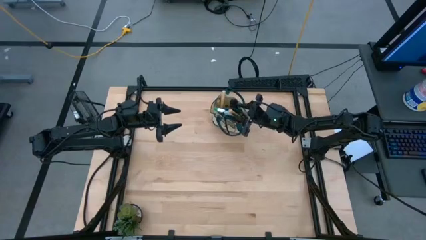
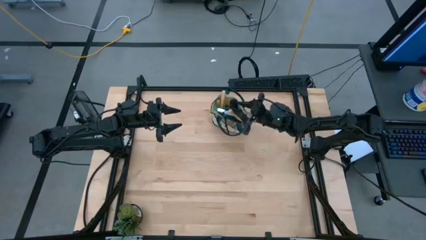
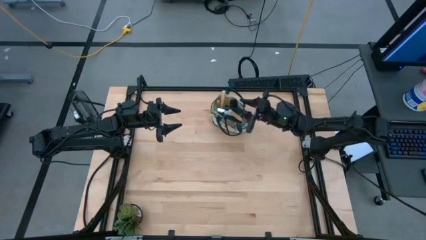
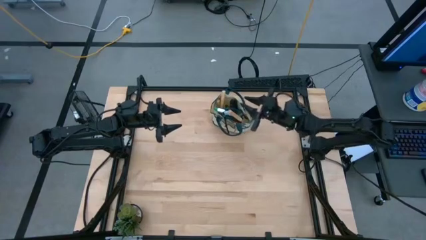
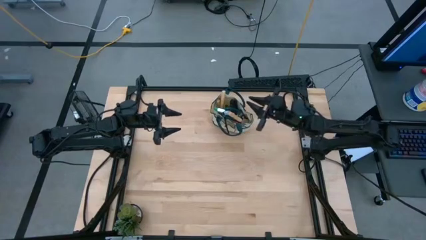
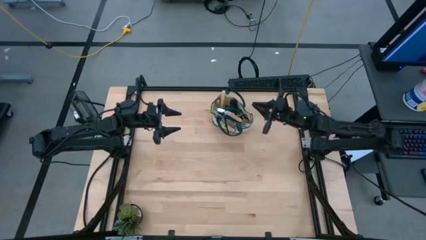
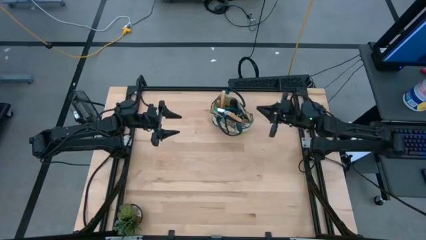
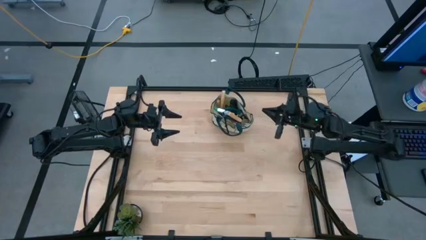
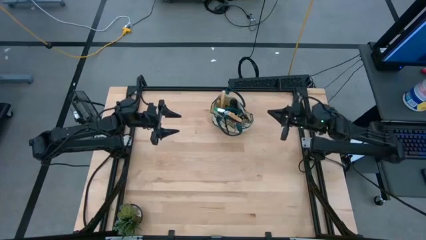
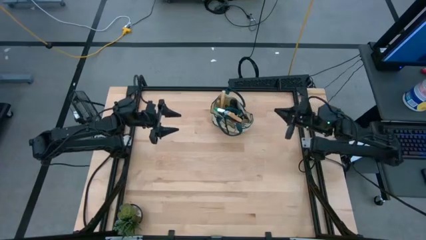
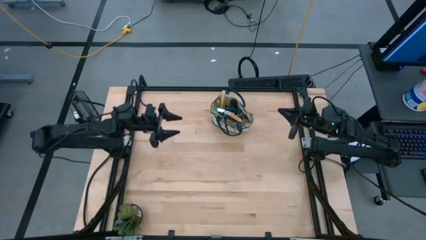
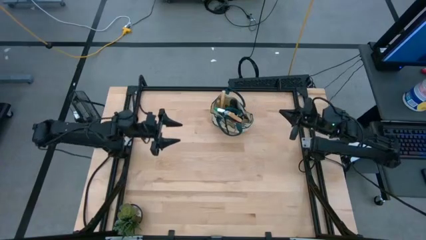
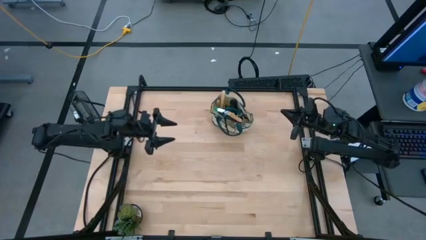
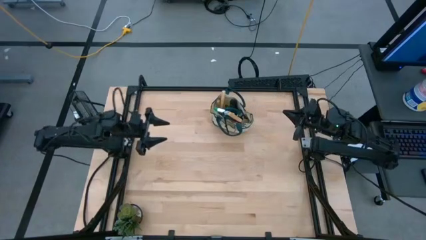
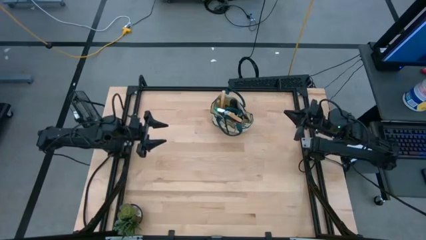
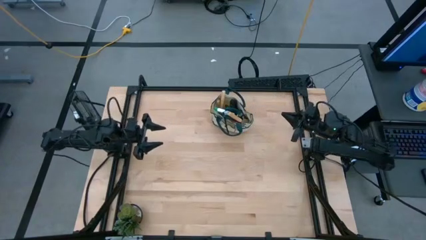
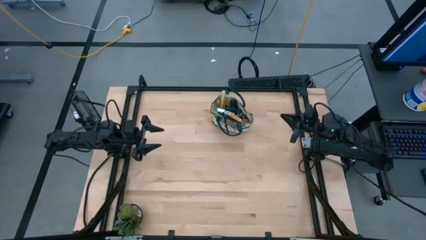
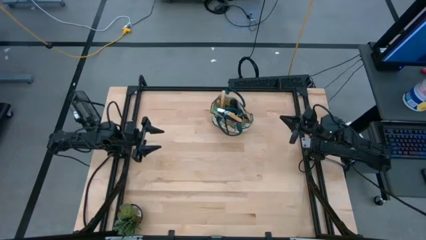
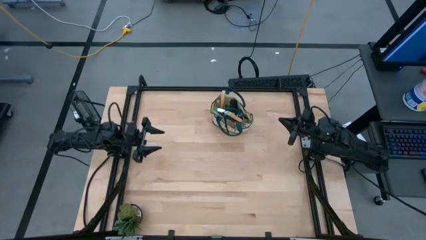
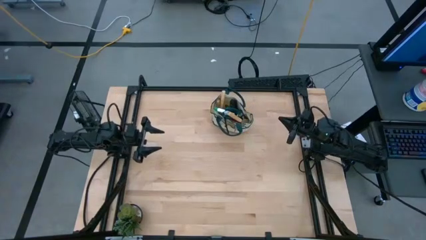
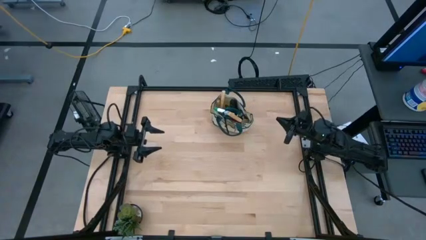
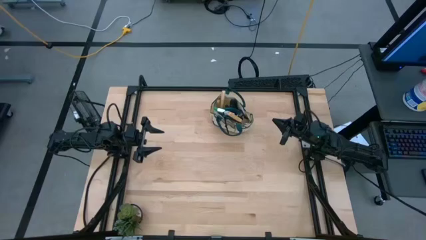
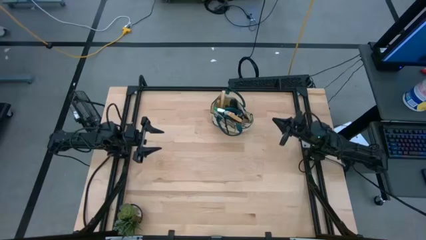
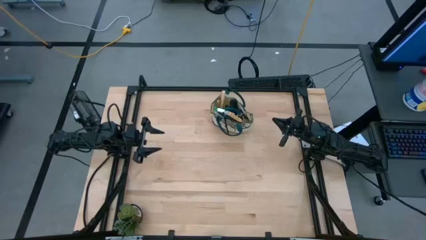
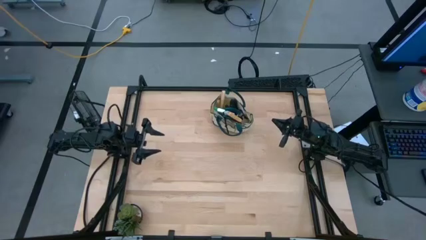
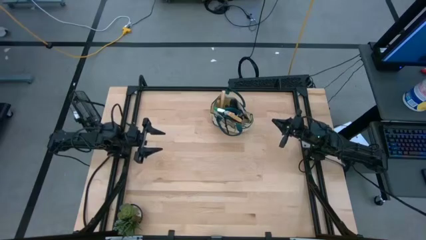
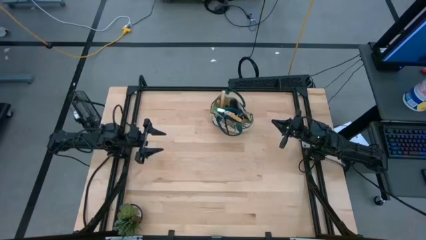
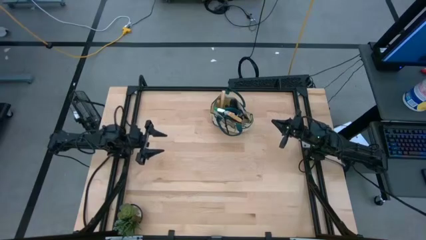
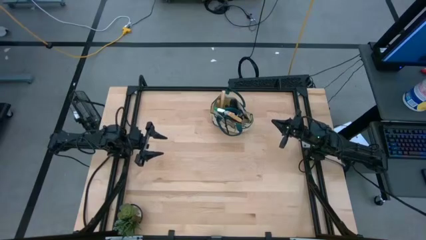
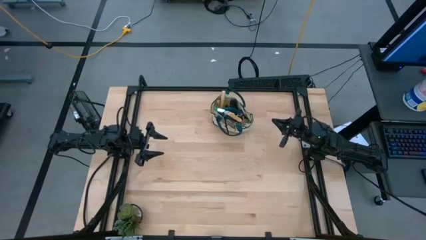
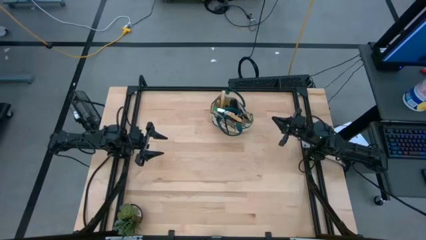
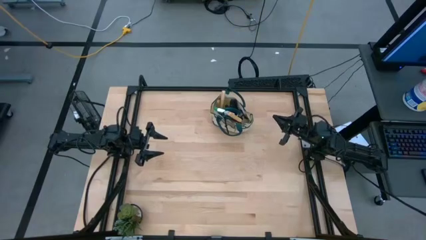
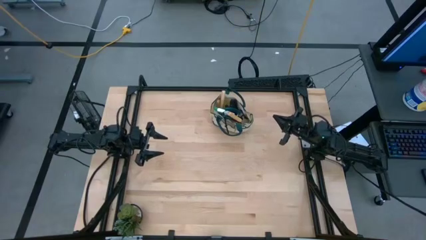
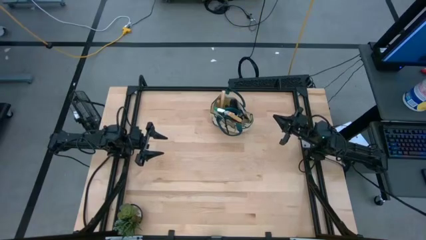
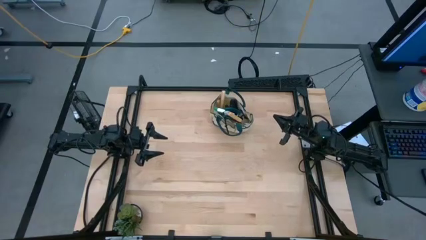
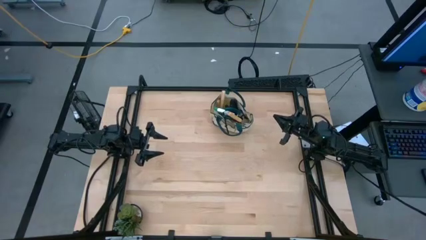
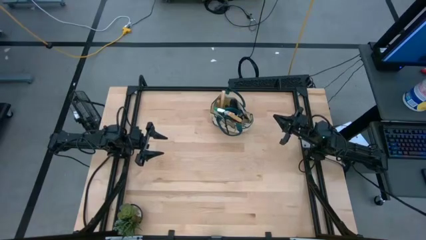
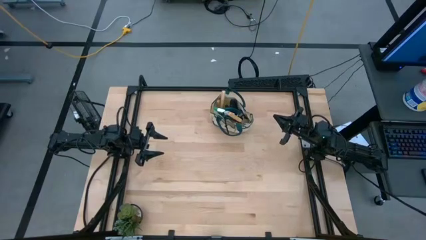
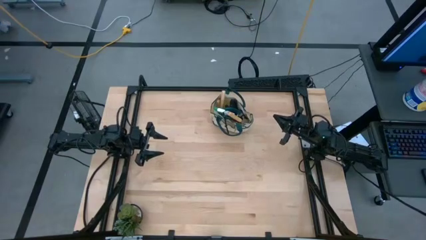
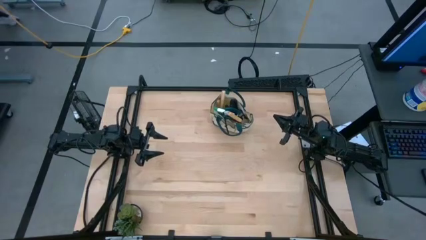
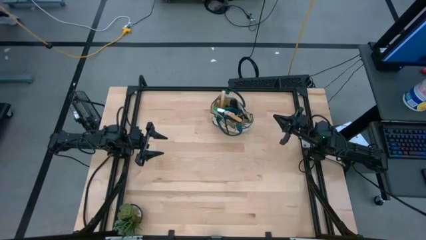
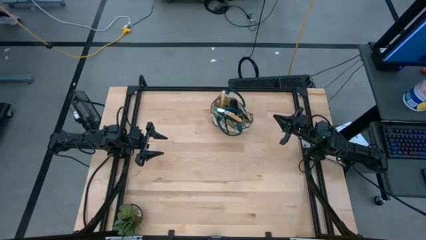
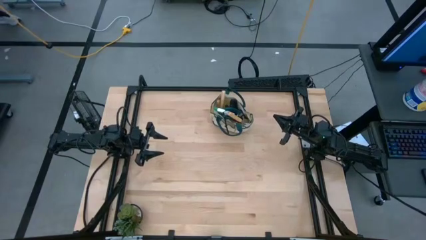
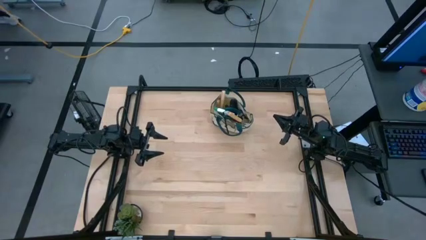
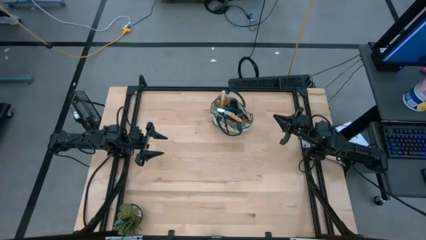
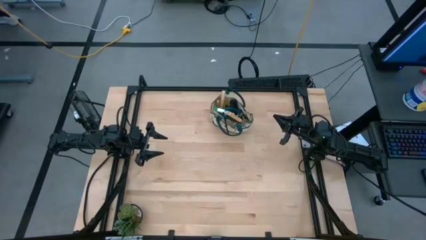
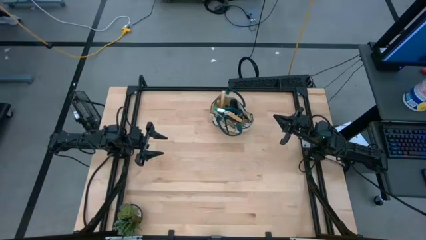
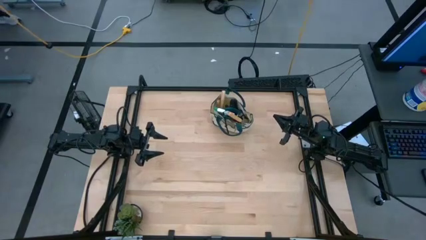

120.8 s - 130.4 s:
Task: Pick & Place Garden tools in Gardening bag
Return to Home Position

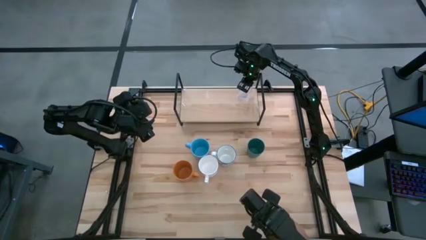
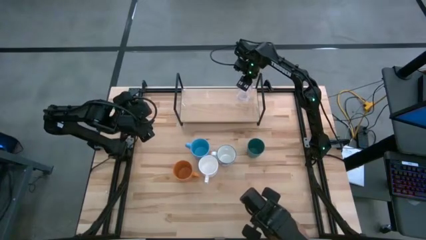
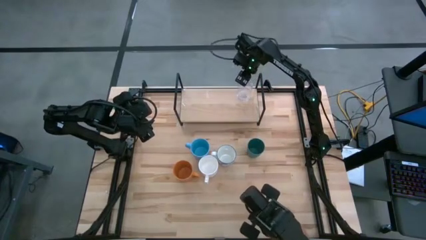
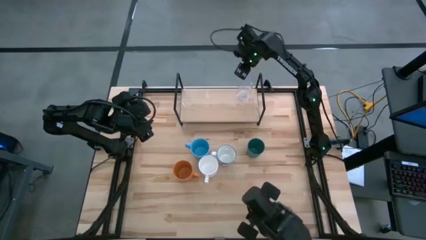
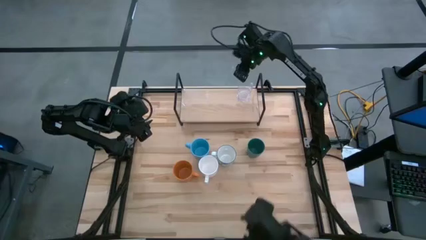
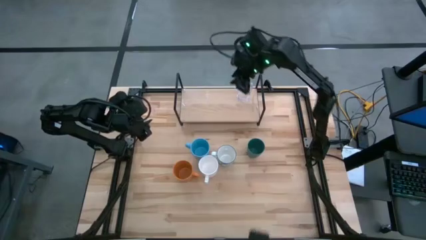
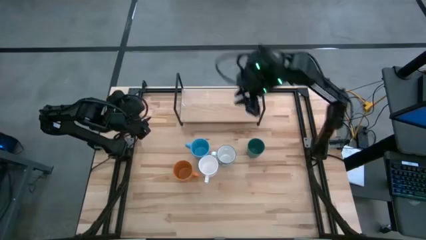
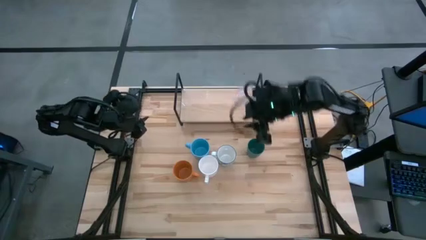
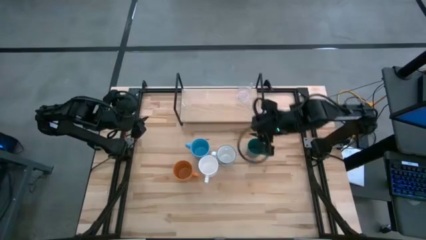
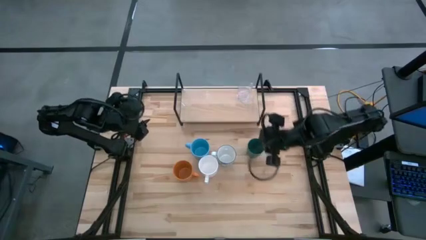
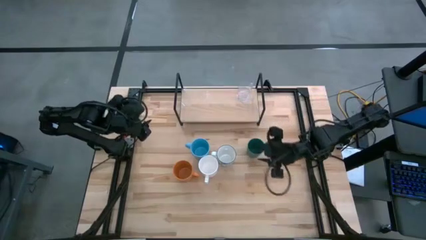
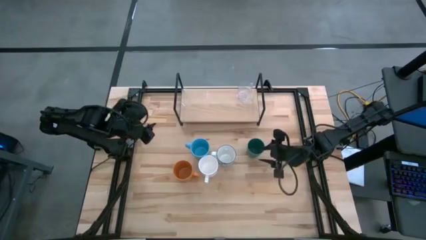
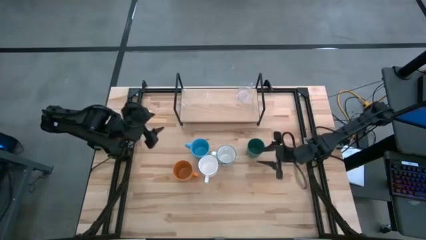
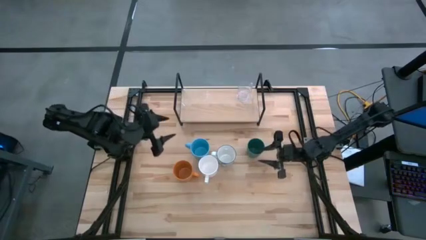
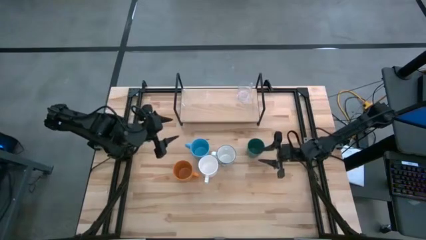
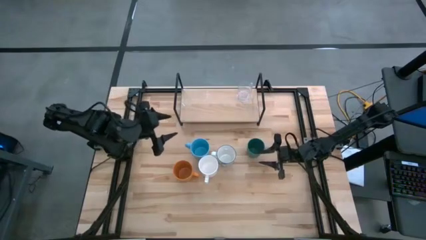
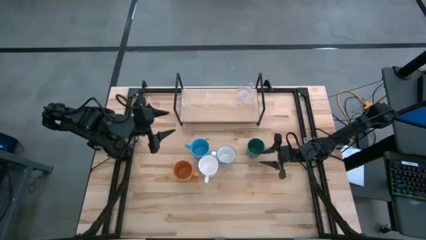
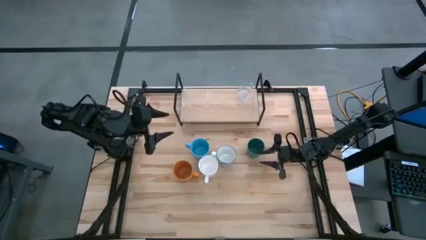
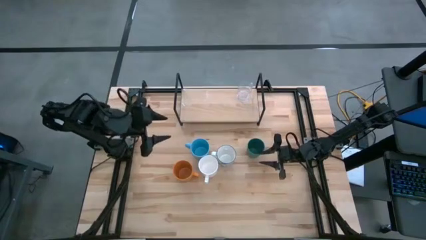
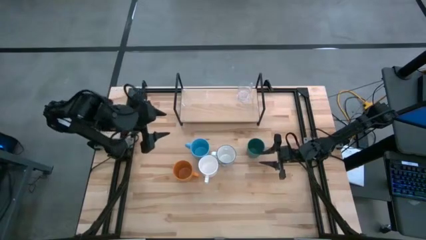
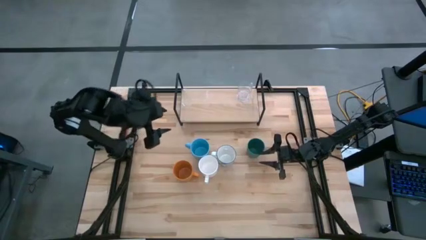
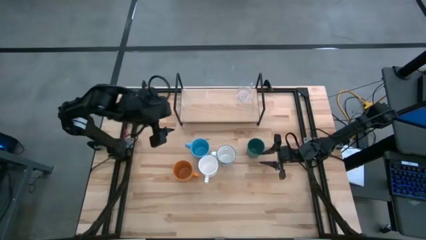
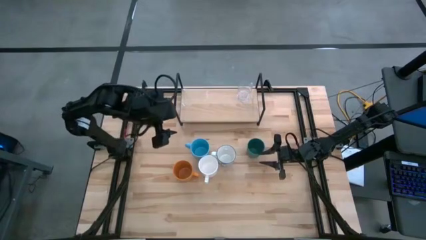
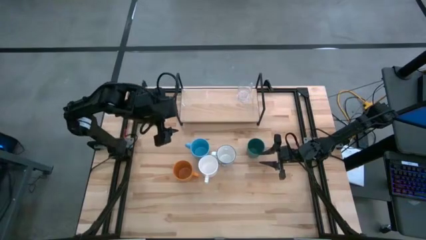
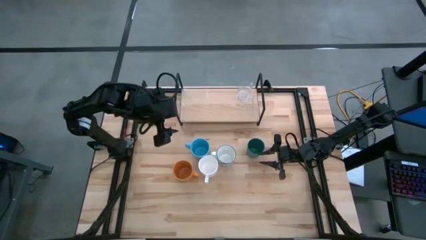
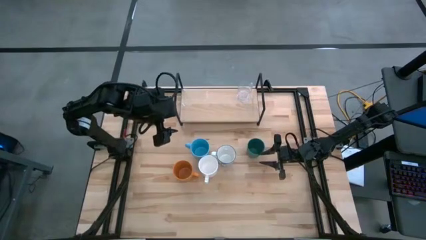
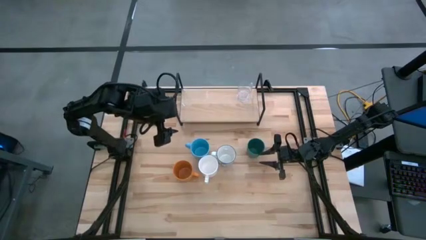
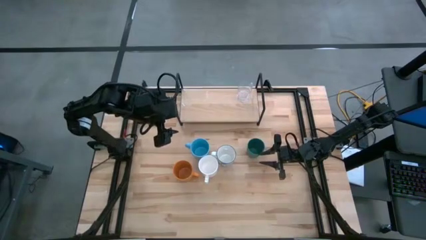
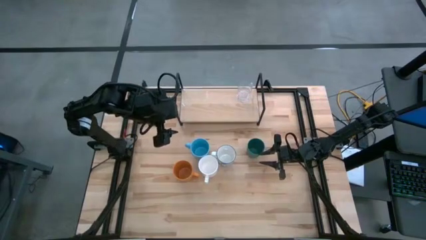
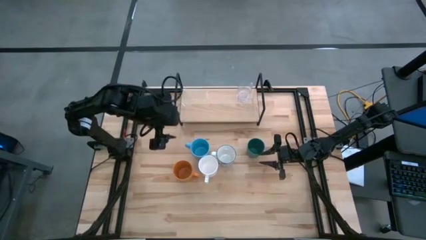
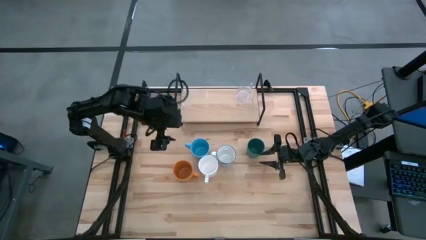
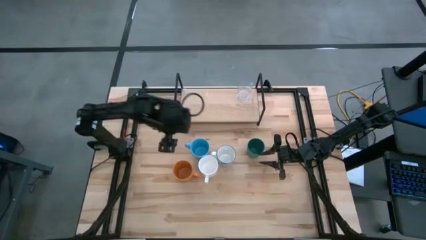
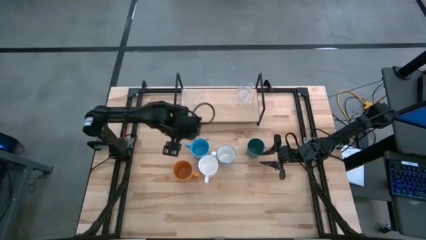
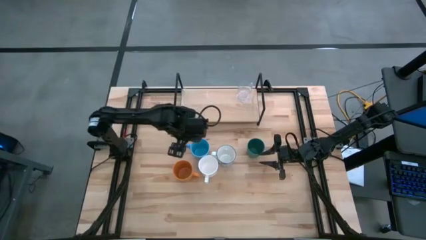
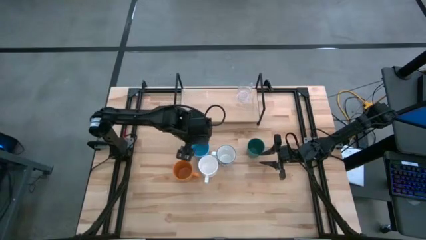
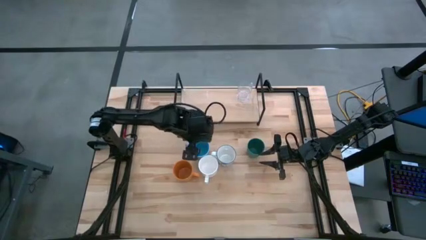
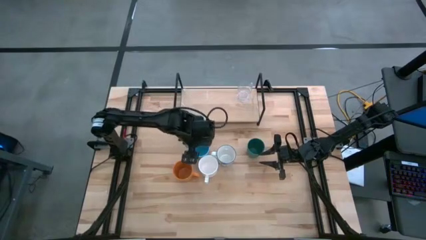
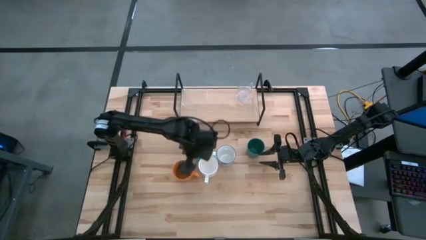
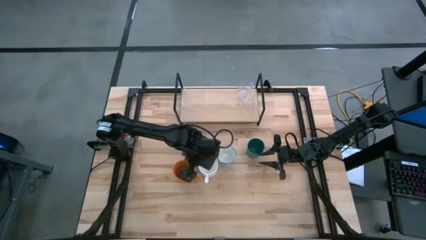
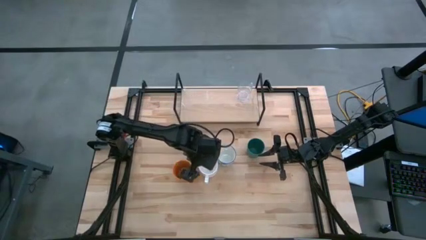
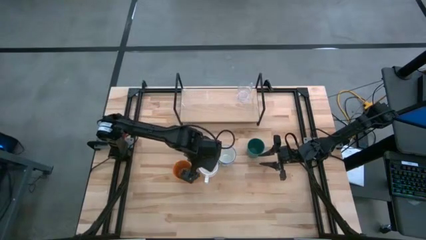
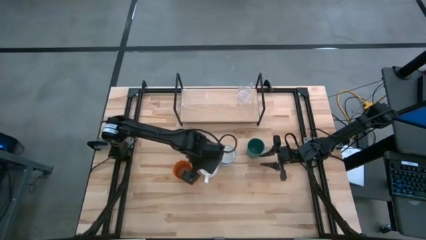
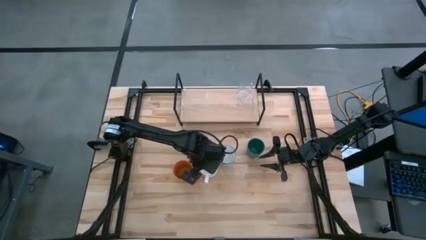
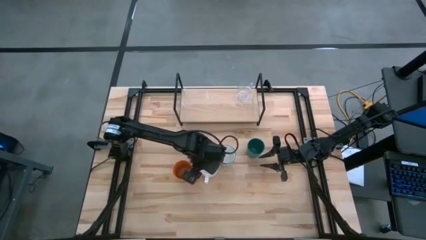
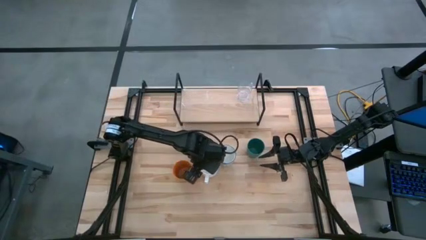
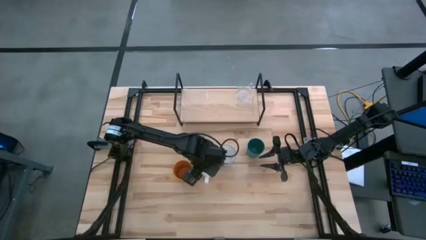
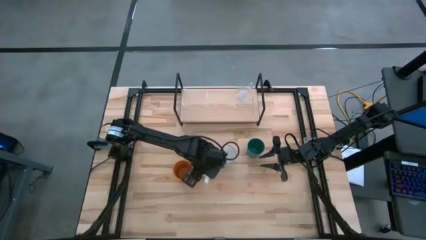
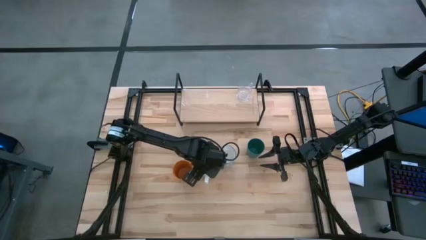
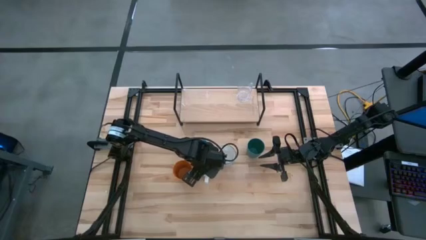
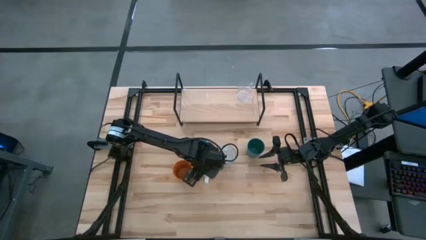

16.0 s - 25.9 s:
Task: Stack small to large cups/mugs on shelf
Put the white mug on the shelf
